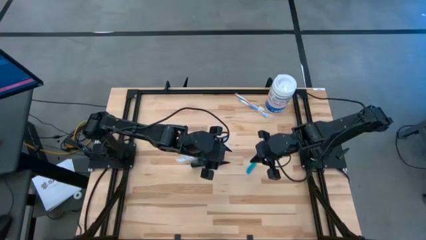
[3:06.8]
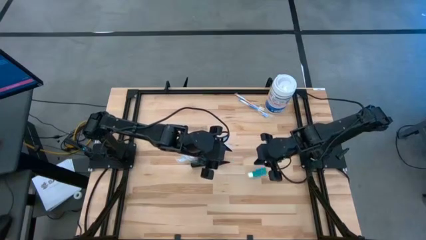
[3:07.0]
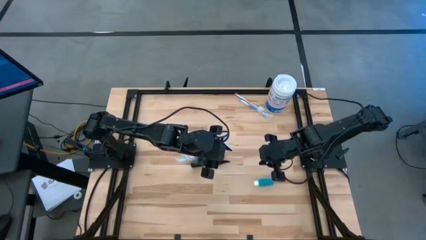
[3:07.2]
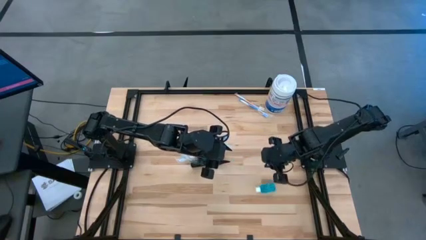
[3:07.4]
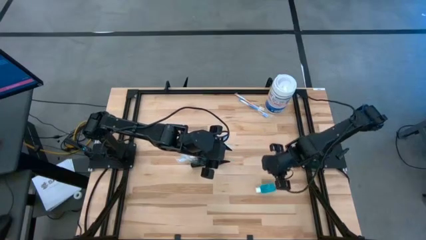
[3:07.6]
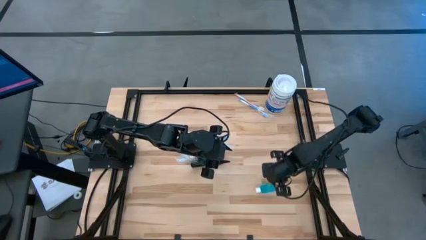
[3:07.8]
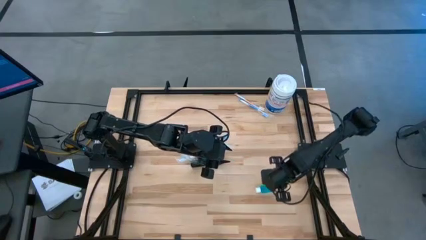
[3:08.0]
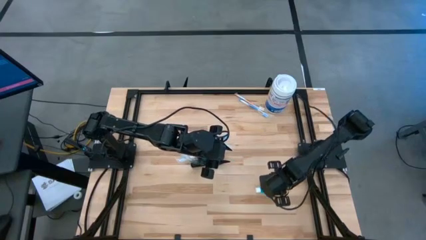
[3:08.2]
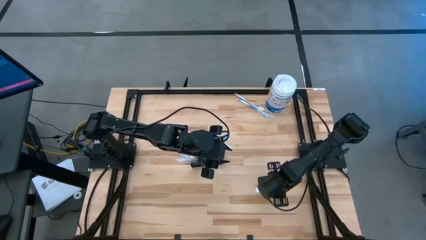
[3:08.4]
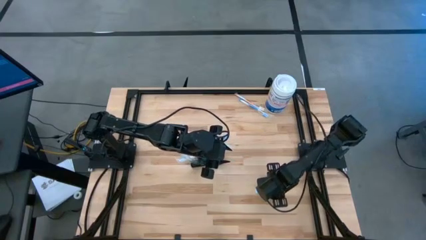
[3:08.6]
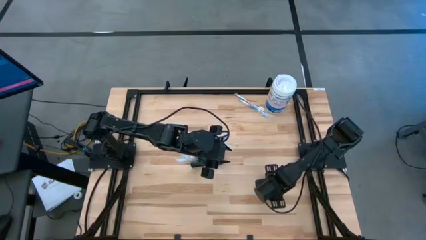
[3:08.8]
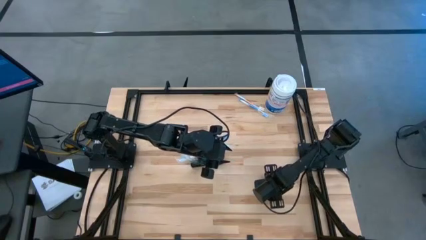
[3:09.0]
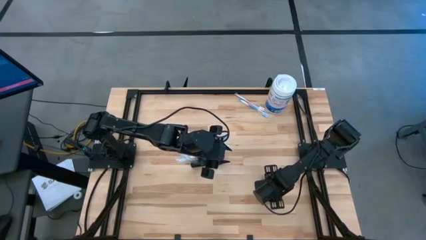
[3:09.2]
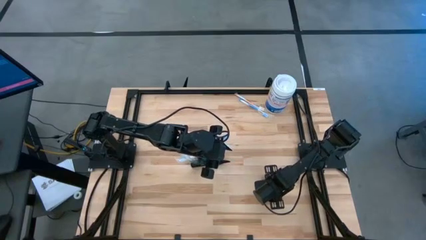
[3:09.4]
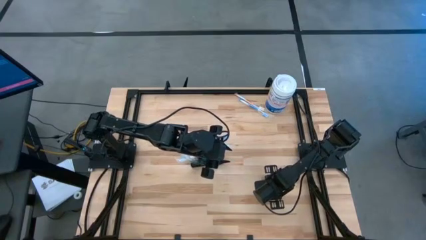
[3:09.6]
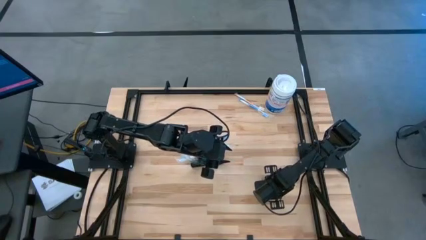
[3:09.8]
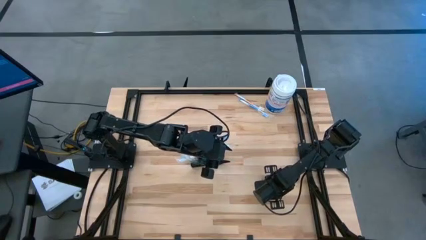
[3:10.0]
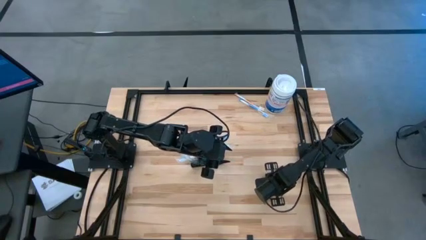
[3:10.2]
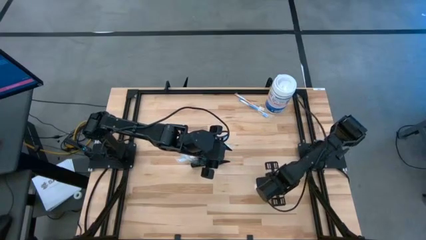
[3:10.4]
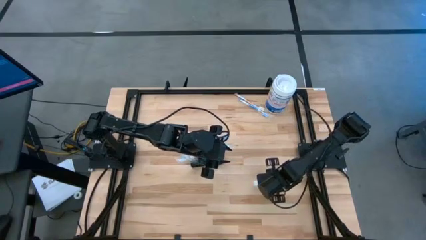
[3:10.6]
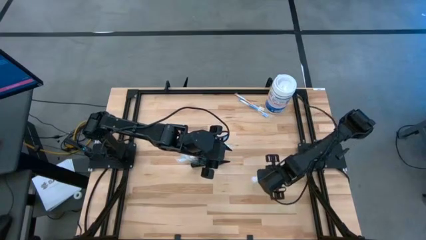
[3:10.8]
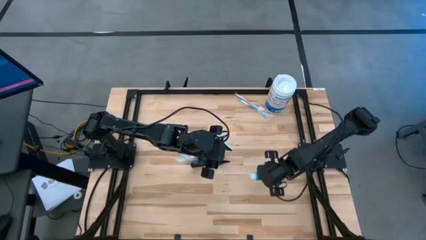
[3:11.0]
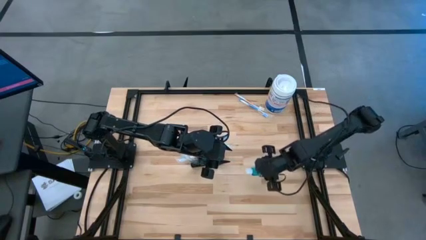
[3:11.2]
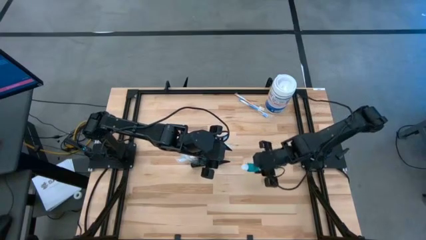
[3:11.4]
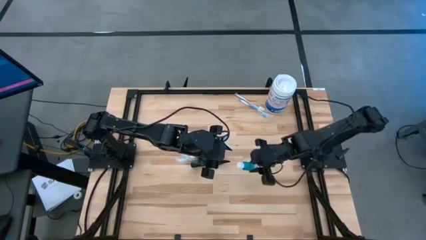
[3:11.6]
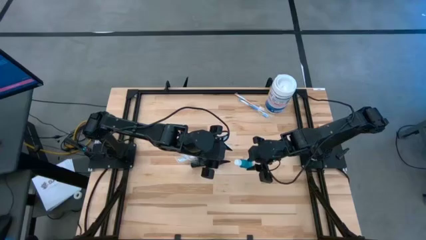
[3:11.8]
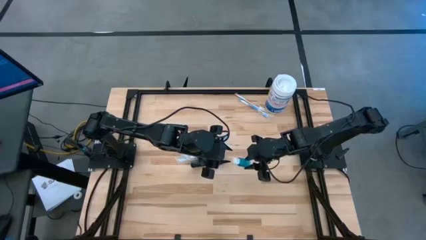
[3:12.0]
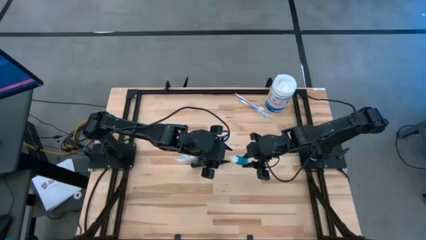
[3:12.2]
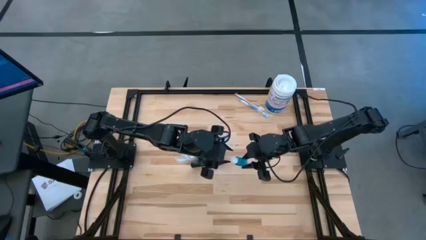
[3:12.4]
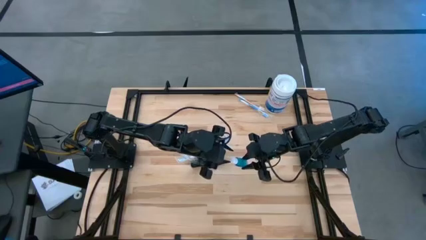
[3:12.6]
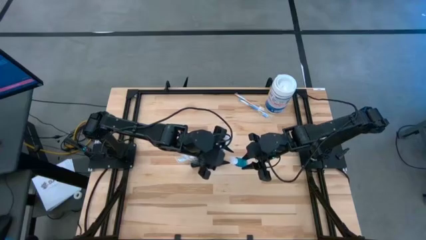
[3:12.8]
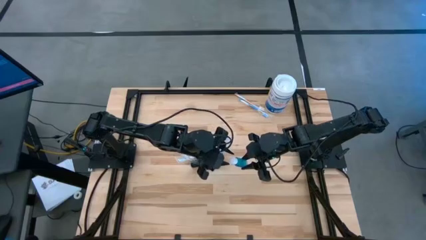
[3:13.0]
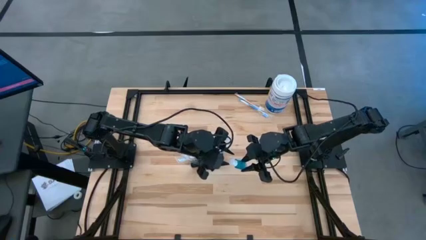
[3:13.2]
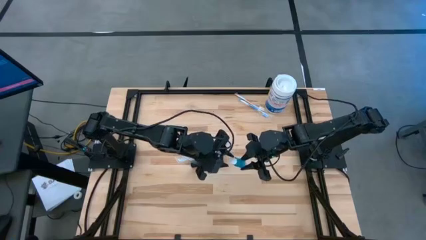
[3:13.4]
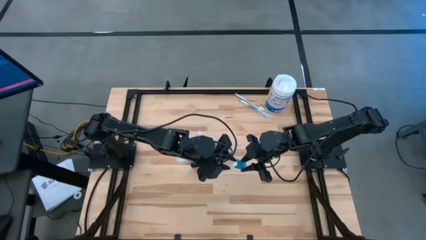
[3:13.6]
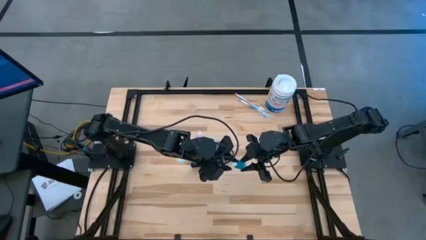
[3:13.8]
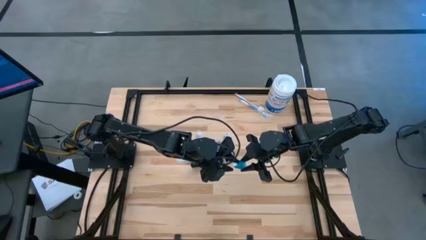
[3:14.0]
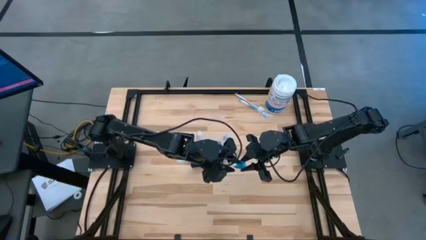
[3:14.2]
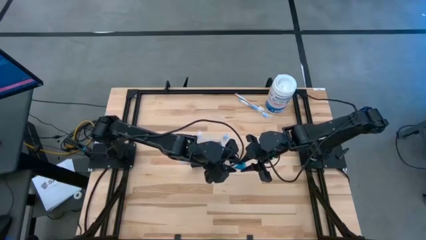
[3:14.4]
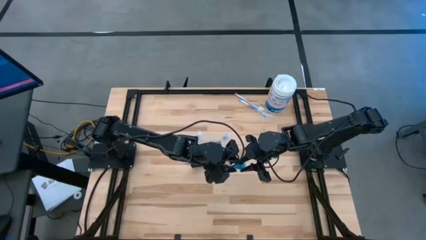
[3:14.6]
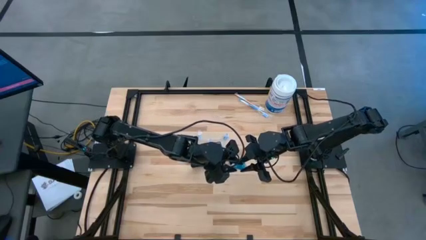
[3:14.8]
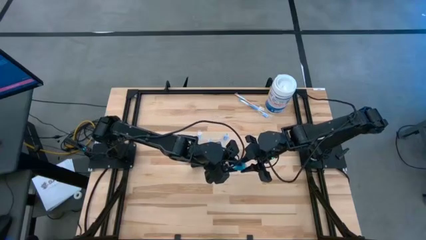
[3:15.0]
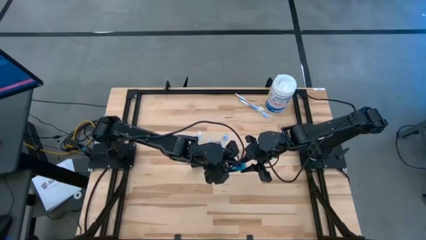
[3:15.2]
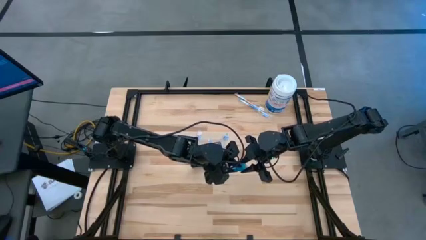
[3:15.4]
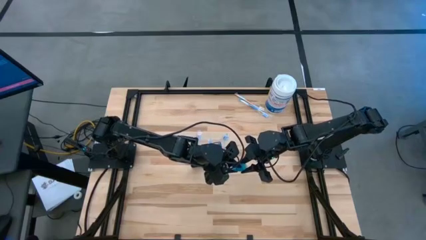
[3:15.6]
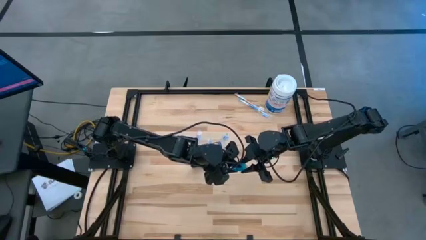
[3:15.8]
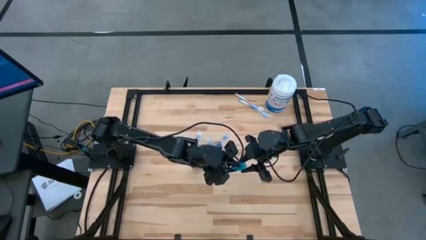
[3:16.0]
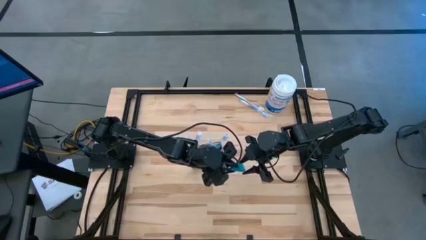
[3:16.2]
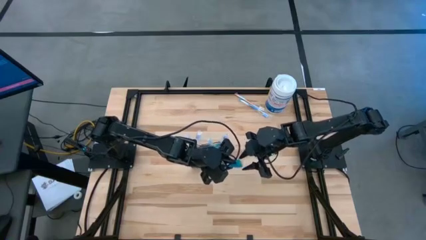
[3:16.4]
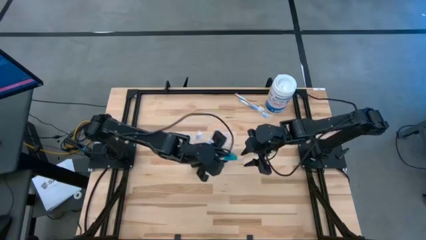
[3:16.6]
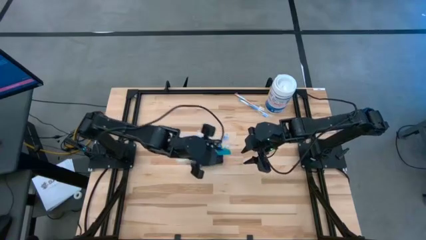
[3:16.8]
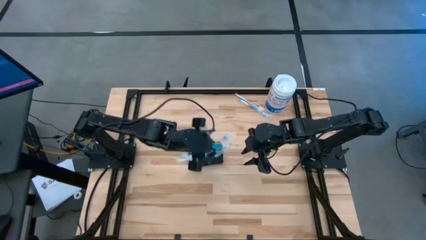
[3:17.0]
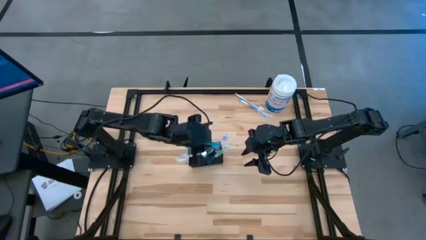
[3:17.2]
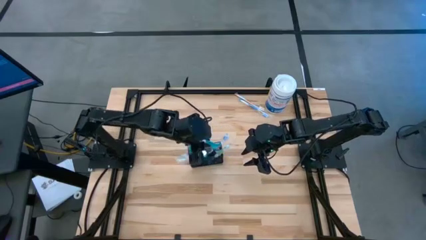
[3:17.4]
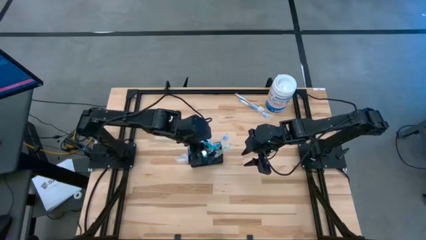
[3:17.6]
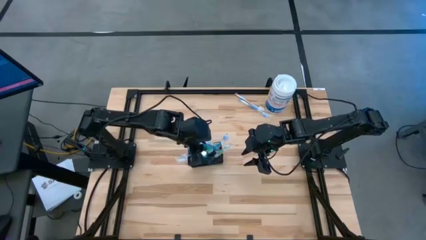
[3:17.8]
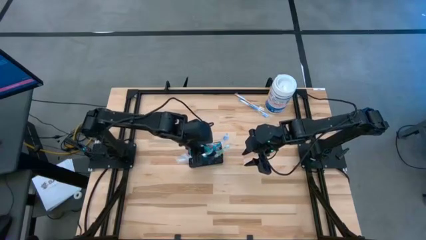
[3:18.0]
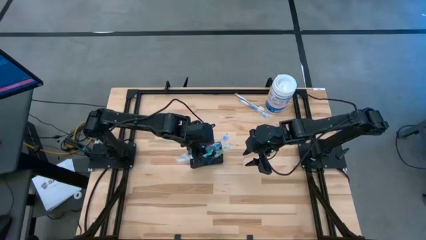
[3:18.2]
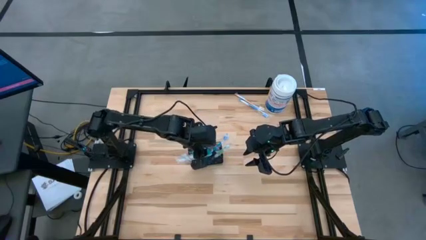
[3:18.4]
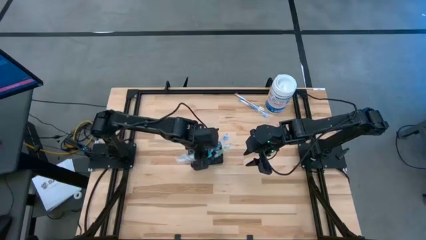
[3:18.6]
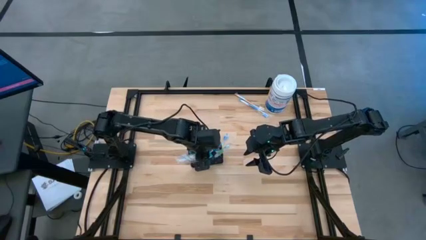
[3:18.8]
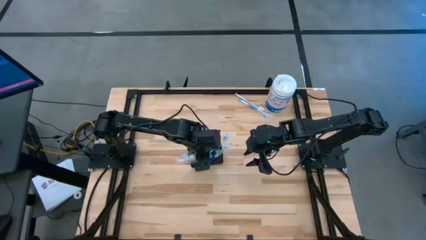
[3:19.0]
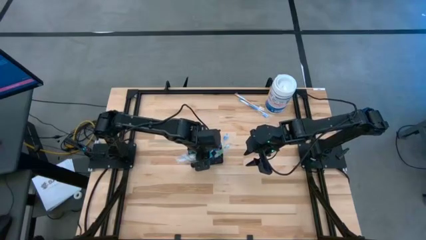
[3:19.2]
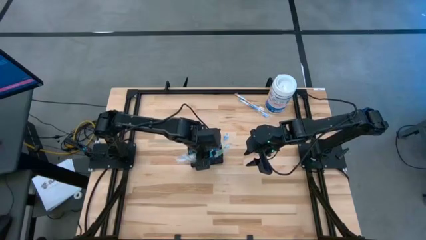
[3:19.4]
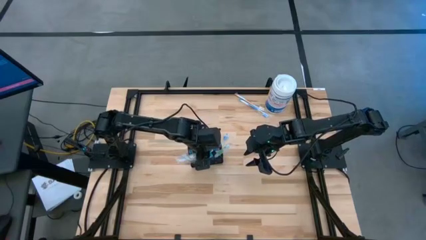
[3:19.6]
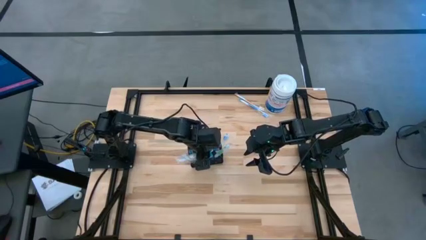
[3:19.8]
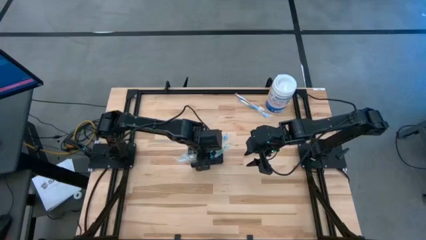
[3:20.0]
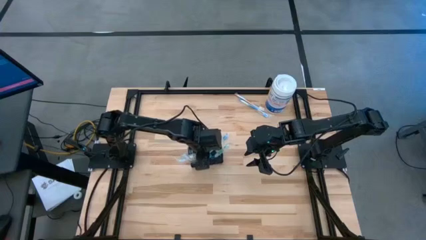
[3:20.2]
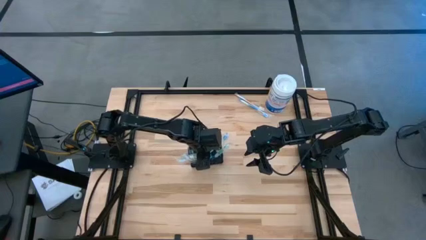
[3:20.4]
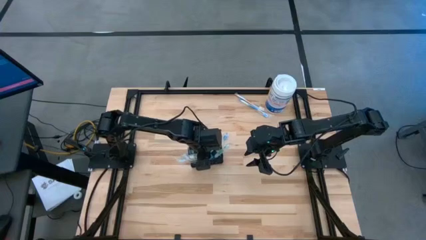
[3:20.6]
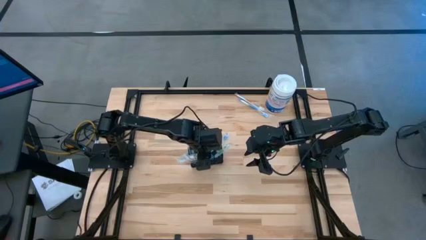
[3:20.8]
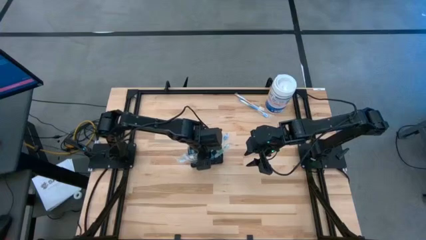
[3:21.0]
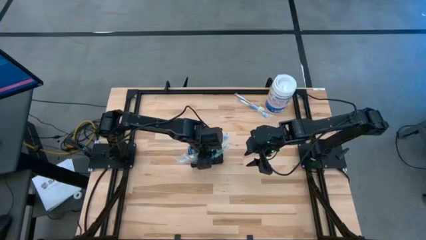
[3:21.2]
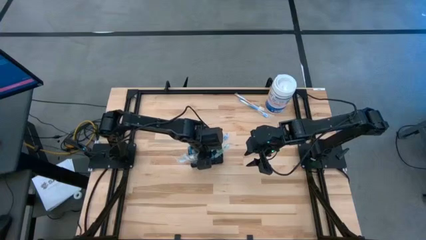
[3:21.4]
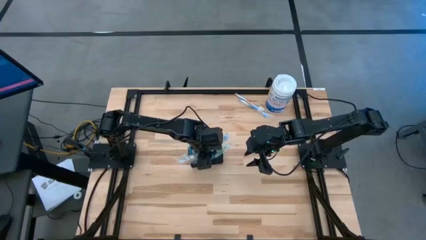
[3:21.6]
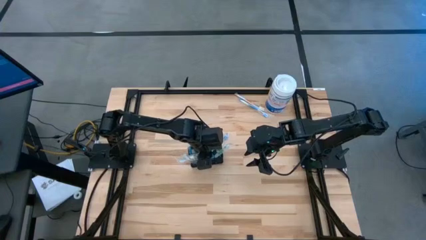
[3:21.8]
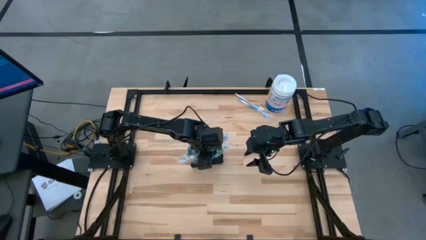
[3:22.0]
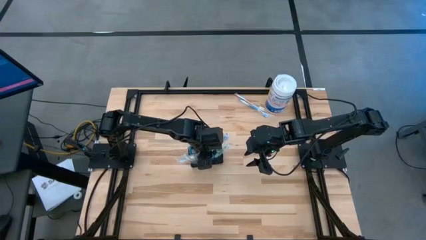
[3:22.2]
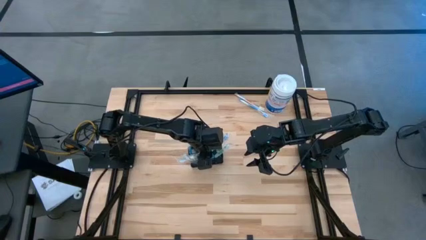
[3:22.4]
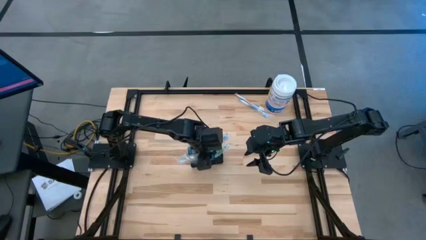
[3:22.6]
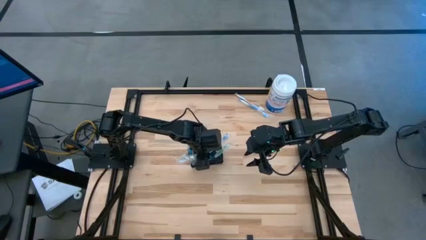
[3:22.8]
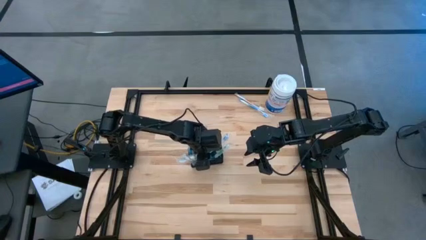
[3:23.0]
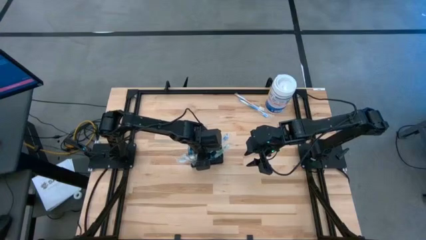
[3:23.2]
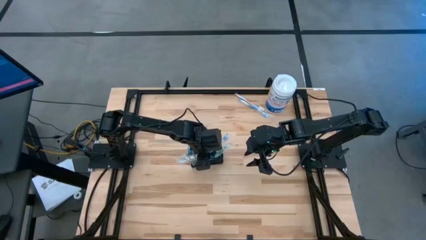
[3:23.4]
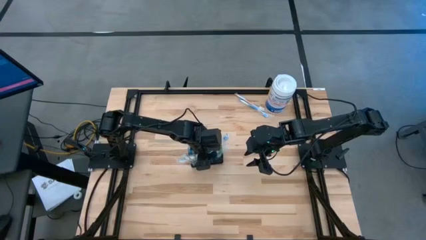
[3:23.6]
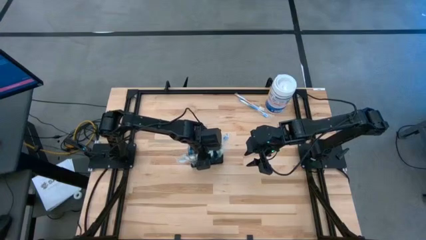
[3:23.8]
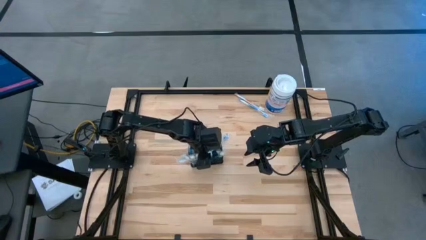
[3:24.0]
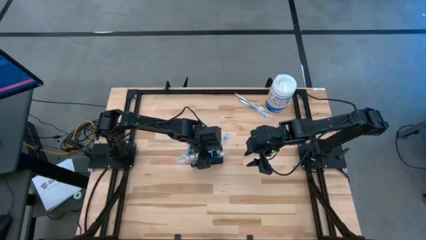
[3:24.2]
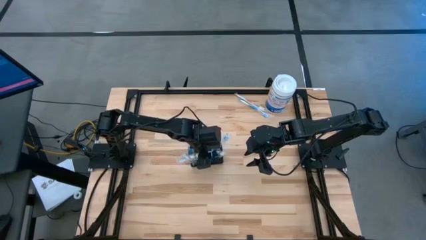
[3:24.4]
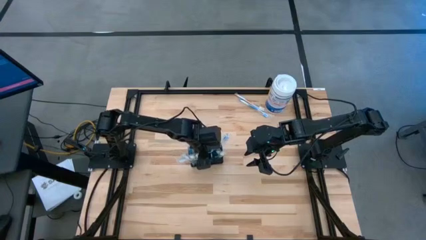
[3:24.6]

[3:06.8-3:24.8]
Task: Pick & Place toothbrushing station
Put the blue mouthwash into the wire organizer
